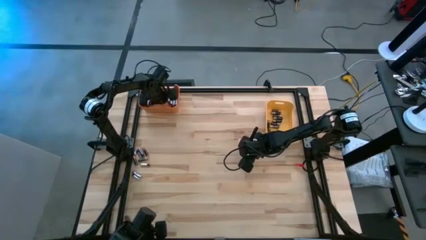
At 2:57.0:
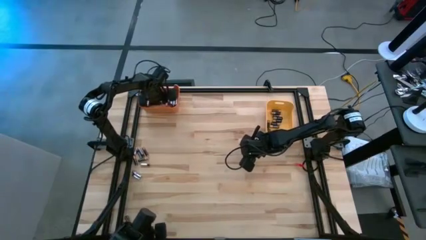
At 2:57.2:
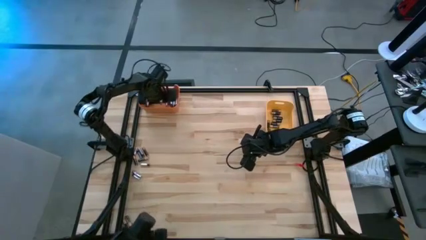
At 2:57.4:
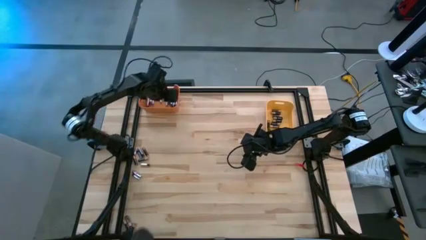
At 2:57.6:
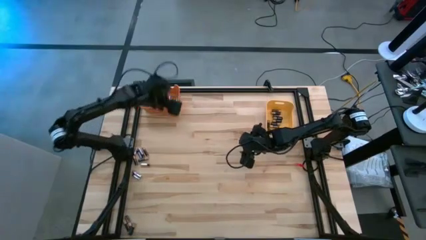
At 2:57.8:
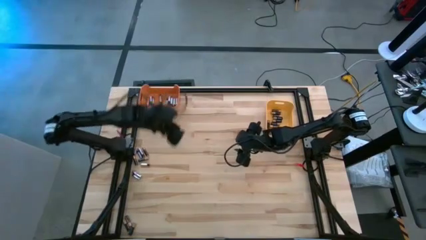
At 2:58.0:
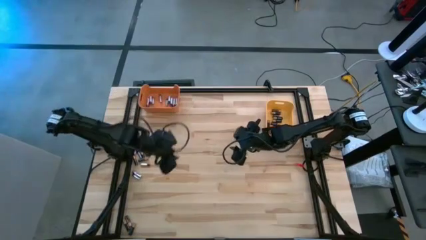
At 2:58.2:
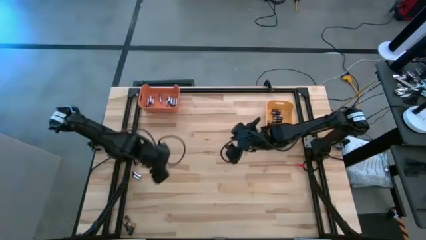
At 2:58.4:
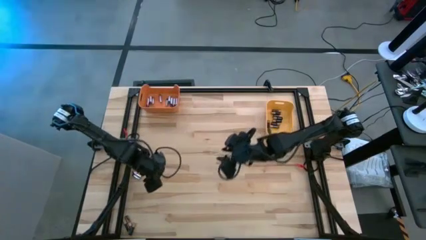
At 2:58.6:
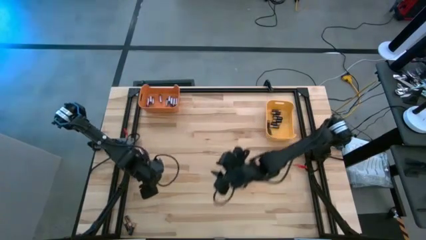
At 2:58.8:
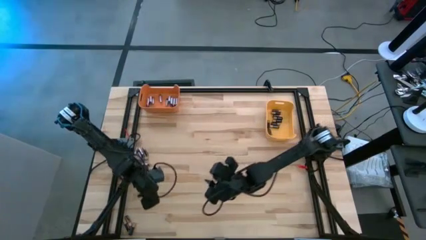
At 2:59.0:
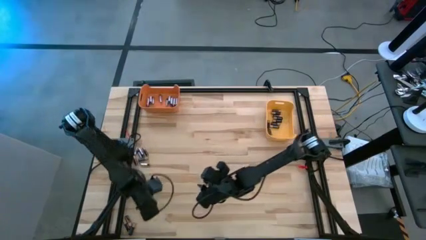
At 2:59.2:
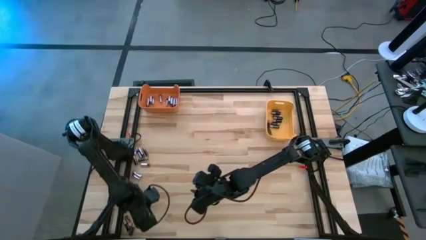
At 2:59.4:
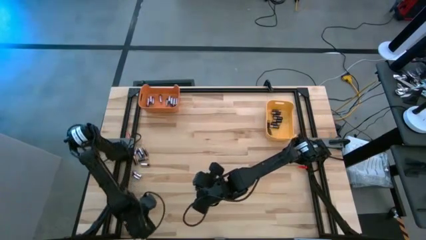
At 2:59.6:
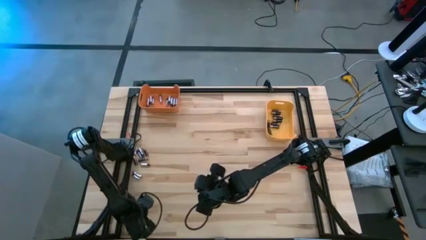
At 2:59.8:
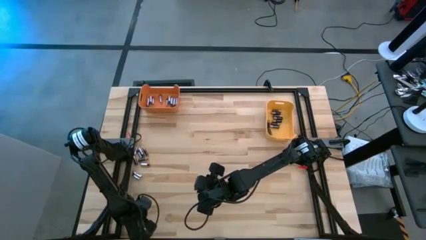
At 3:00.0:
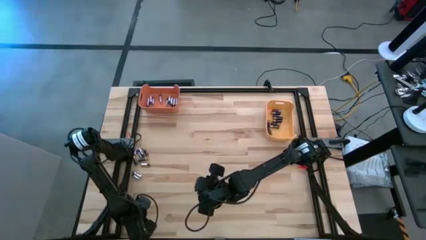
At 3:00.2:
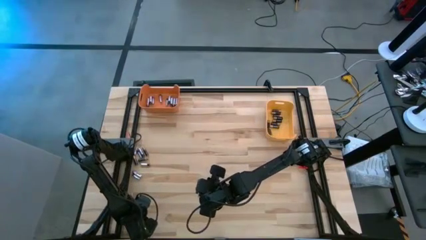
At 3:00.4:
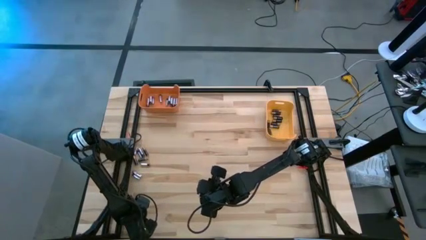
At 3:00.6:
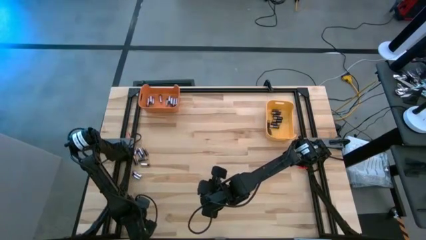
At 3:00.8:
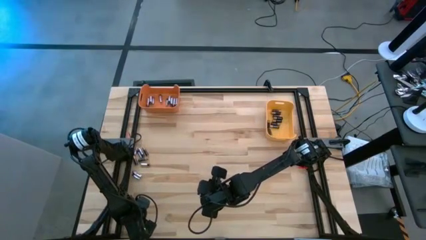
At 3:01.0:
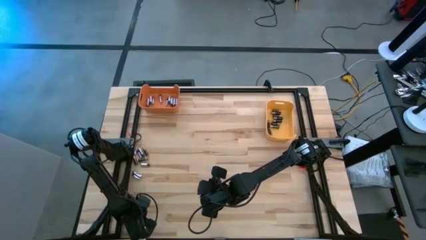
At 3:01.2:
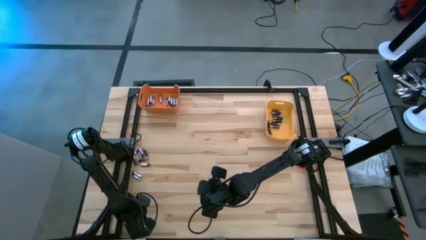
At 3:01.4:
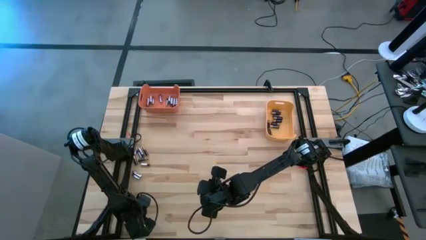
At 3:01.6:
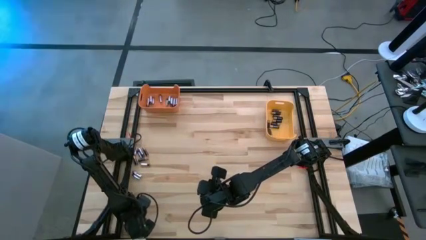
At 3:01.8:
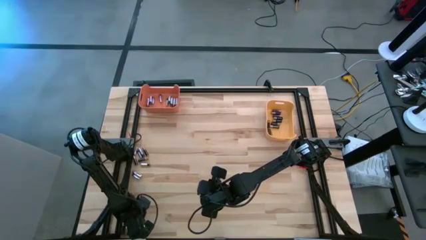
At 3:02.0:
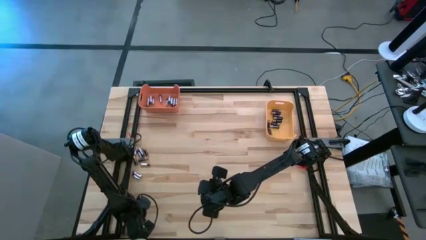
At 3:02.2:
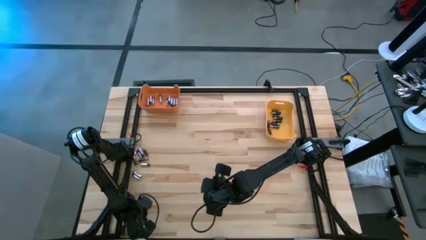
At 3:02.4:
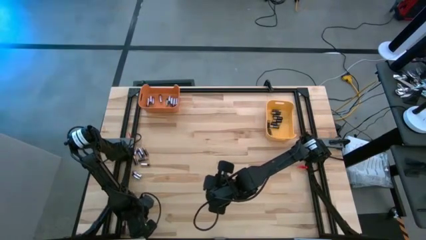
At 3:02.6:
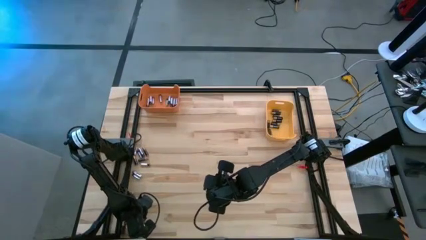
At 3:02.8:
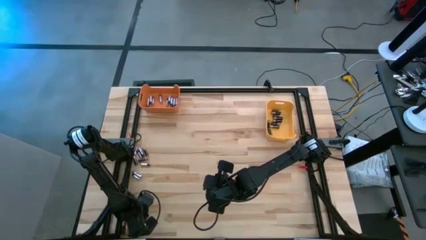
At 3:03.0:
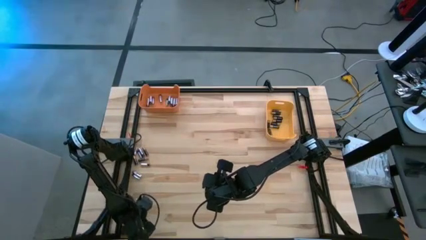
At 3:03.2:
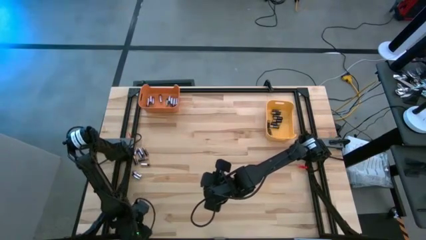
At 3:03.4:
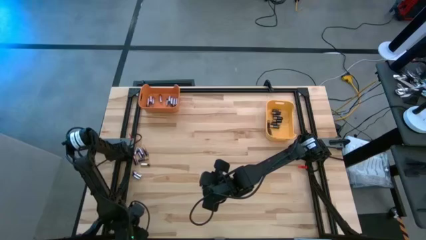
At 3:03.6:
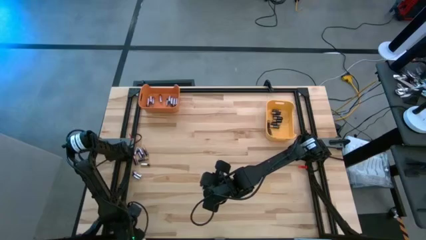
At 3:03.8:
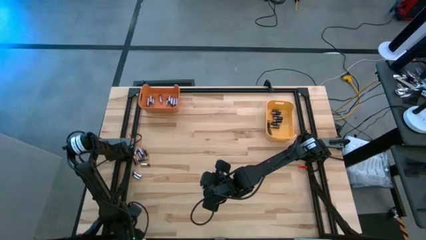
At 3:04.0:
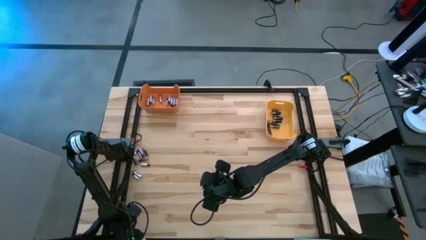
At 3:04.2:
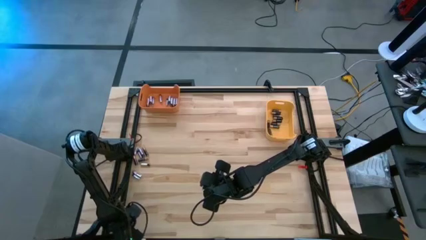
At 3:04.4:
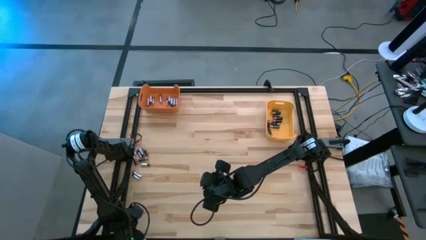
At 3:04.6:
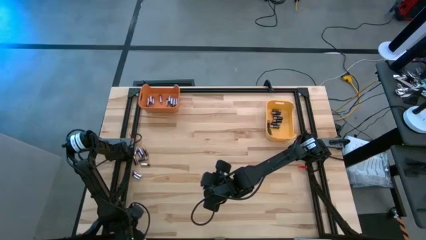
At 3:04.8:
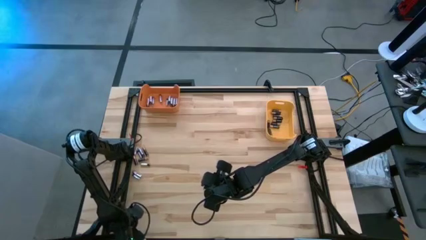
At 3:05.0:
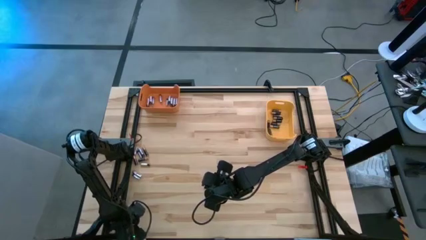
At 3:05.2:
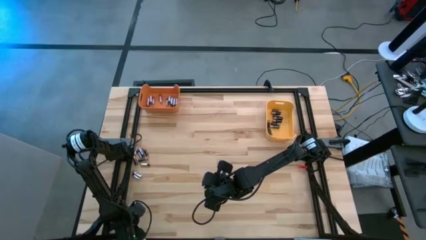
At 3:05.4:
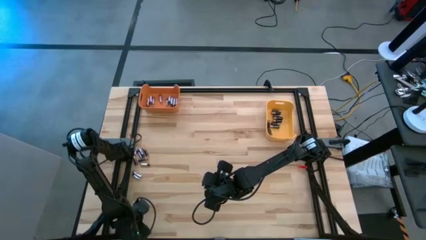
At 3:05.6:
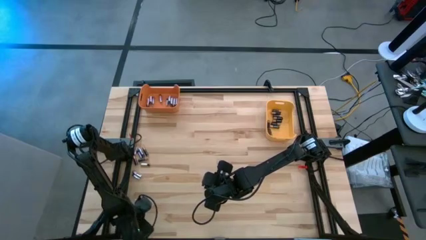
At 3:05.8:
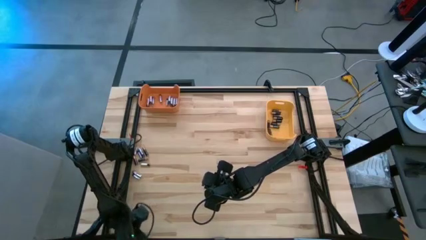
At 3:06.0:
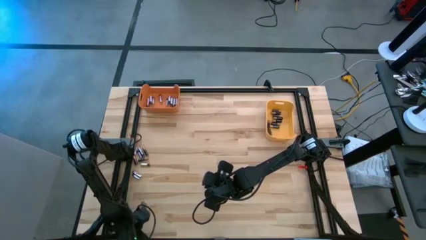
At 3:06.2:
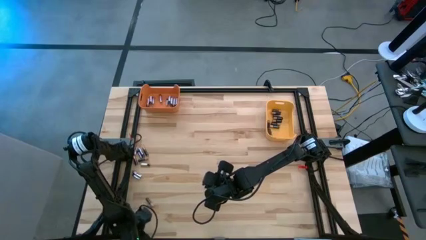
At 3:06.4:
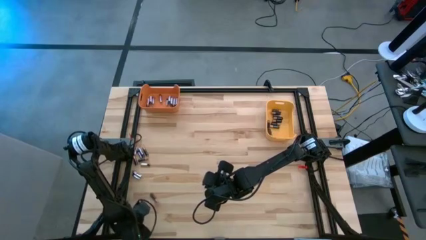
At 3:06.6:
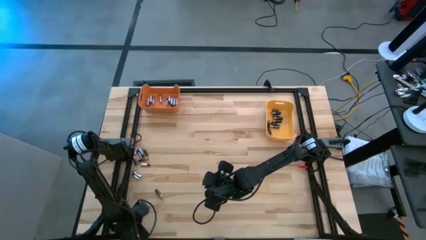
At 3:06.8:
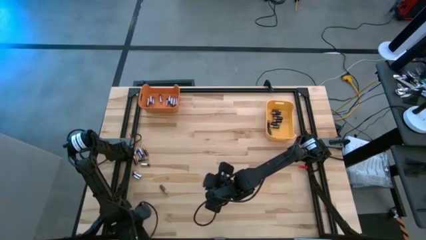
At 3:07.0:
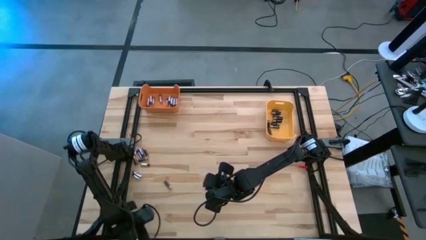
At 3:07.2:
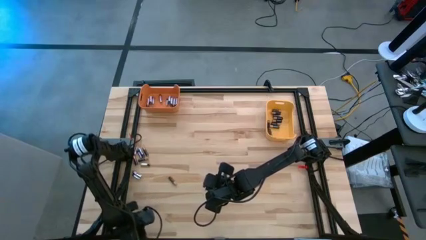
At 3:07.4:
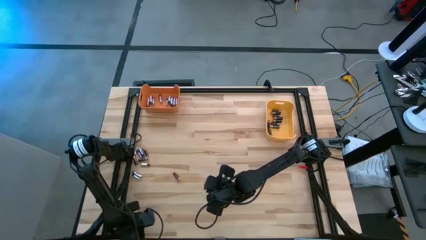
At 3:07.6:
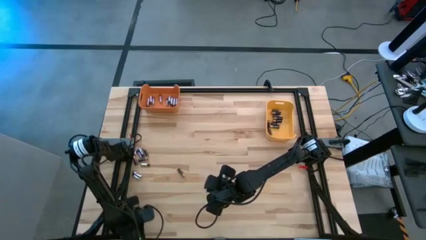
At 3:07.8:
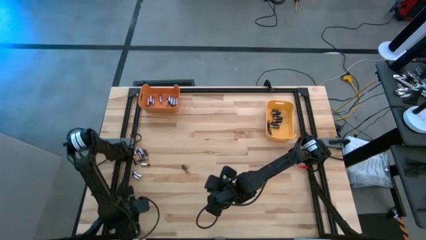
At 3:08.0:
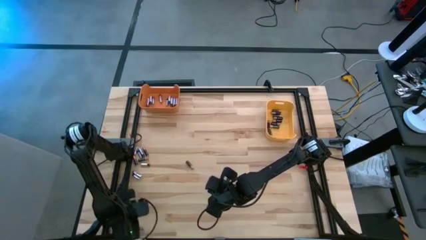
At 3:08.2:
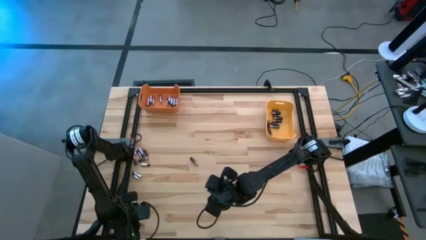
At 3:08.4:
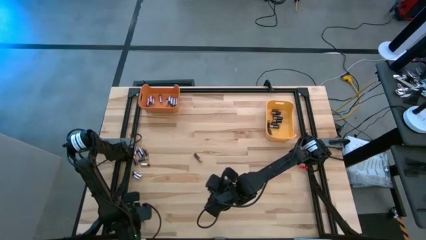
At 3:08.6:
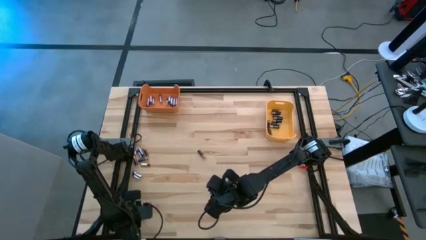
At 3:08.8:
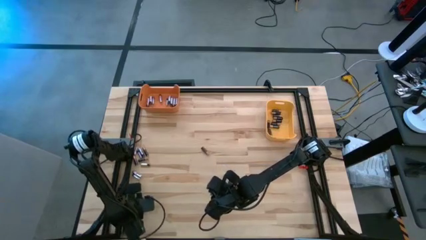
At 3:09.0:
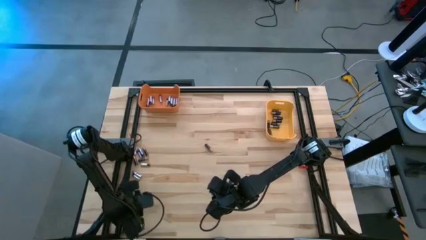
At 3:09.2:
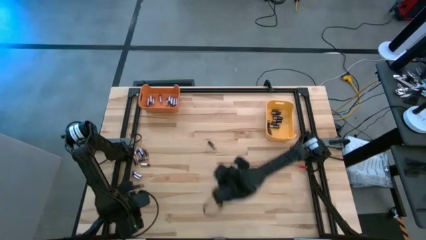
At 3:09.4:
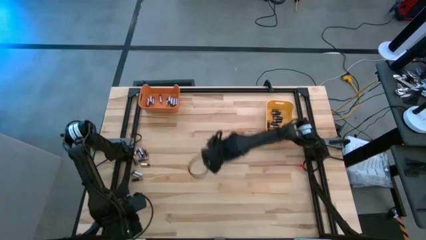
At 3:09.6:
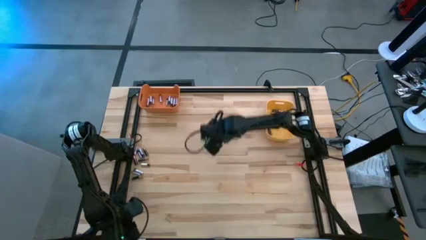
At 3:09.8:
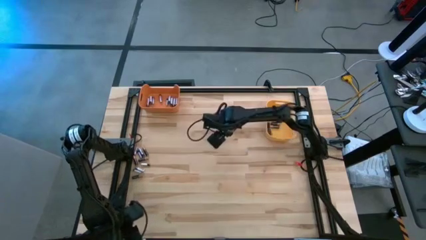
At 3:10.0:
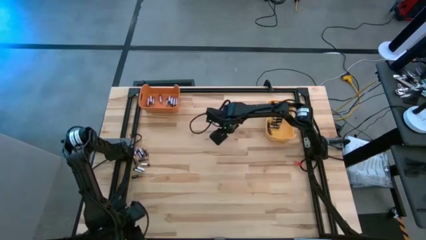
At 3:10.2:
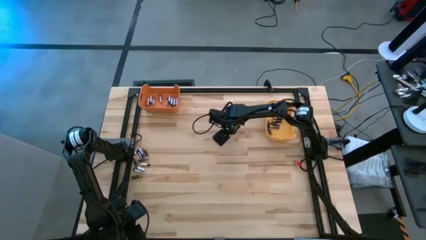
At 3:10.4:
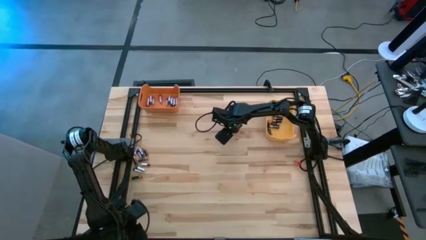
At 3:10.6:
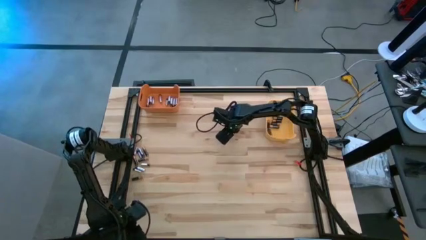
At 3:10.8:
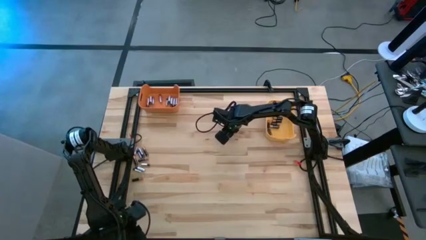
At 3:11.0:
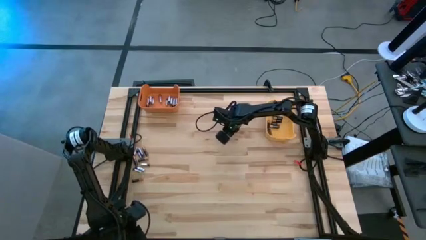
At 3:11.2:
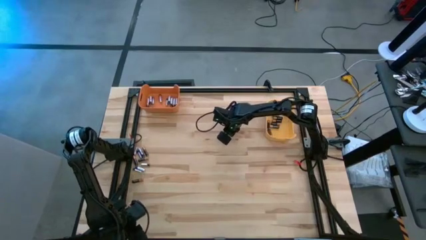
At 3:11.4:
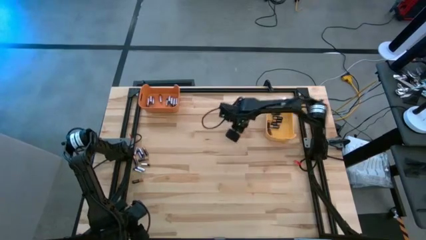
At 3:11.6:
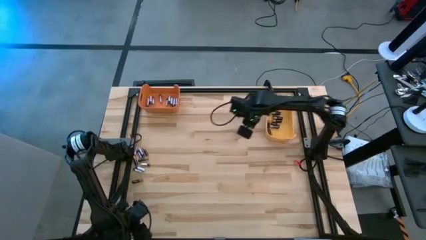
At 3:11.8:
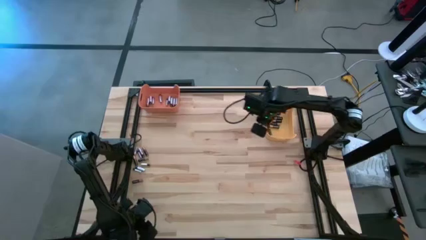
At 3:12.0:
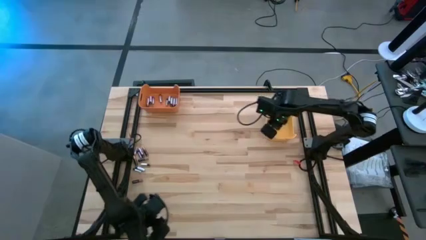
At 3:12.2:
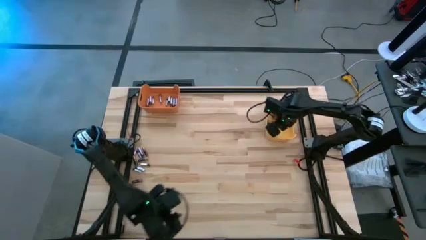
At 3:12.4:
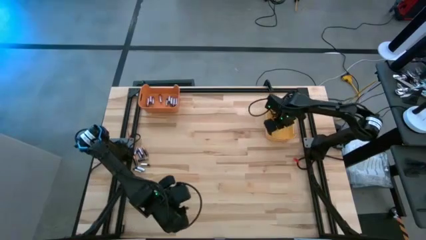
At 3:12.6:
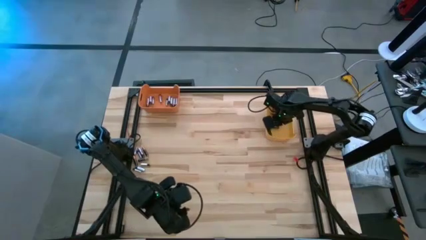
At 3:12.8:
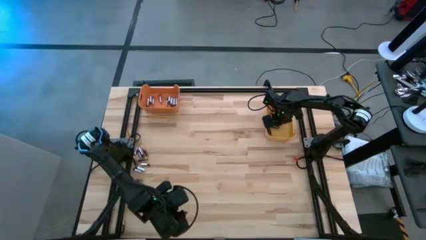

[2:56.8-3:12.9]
Task: Sort batteries
Put the black battery into the yellow bin

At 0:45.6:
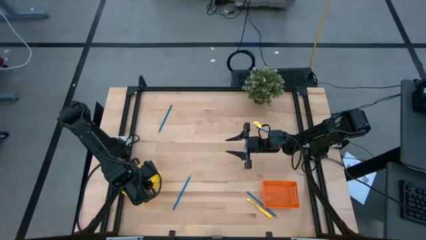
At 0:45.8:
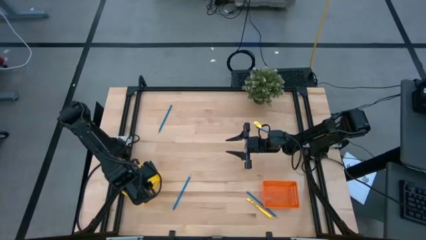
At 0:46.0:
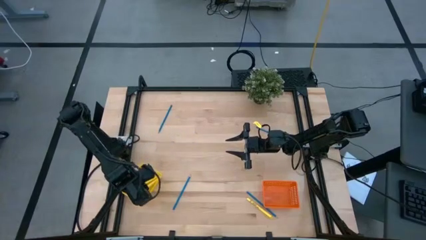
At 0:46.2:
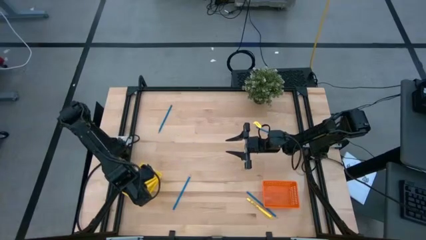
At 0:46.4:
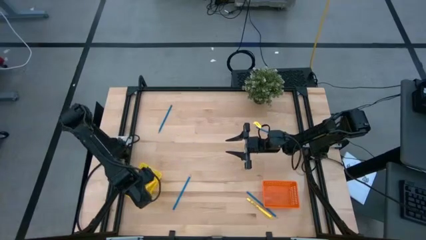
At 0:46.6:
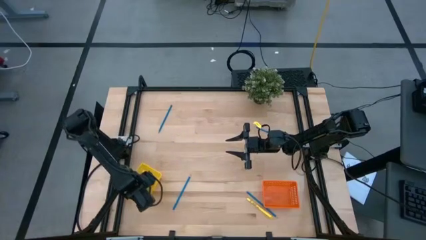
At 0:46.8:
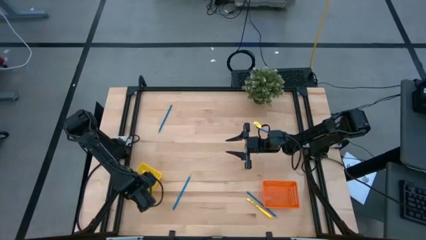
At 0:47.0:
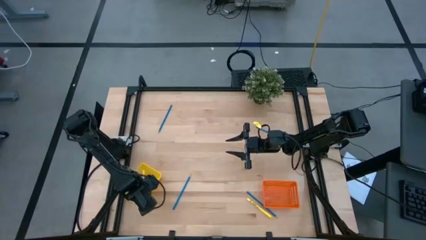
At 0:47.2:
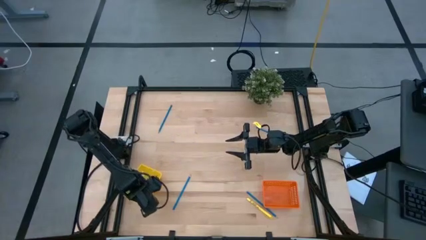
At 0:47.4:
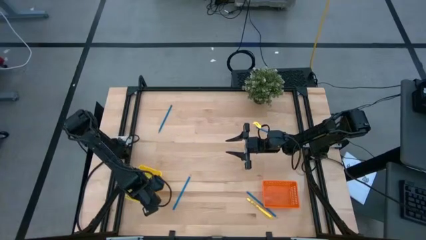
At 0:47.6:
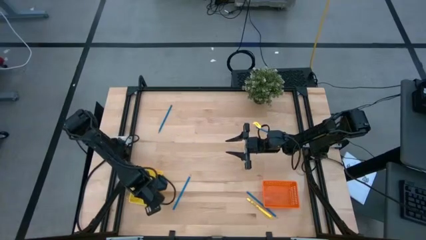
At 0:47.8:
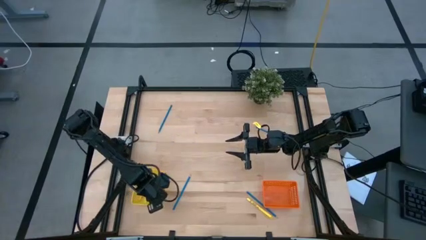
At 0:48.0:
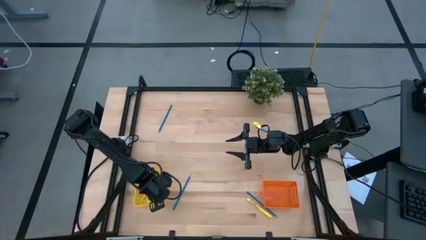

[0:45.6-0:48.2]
Task: Sort pens & pencils
Adjust the yellow bin
